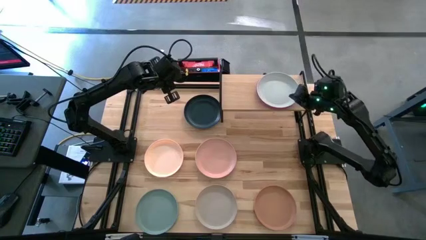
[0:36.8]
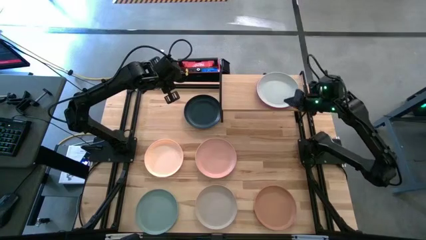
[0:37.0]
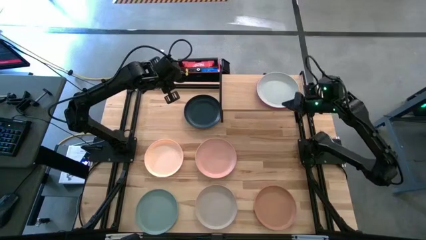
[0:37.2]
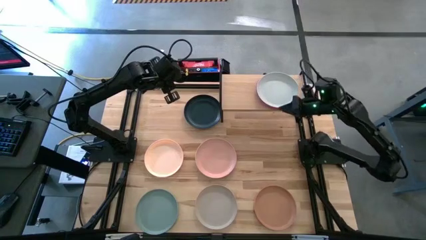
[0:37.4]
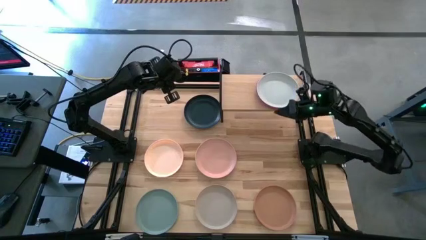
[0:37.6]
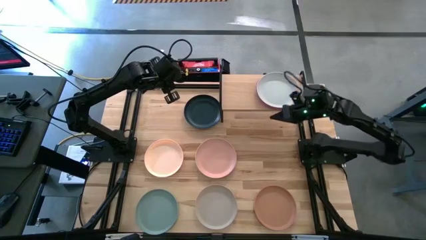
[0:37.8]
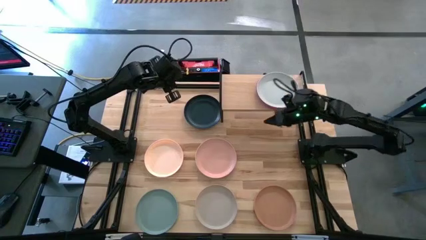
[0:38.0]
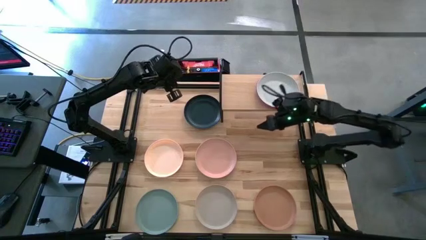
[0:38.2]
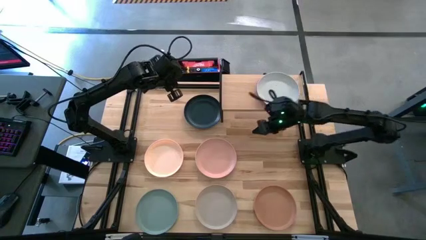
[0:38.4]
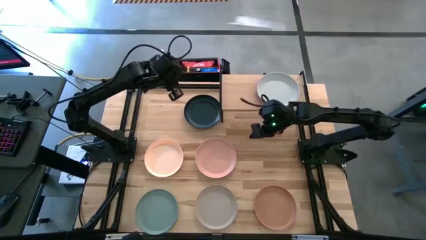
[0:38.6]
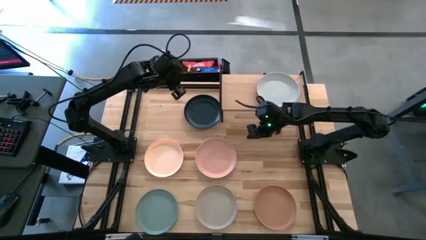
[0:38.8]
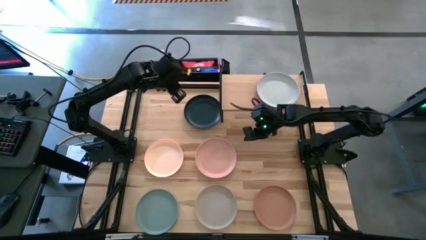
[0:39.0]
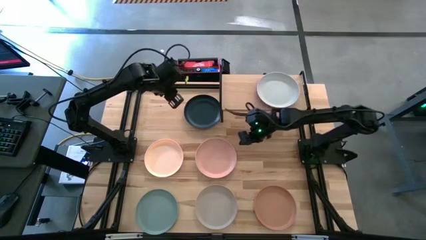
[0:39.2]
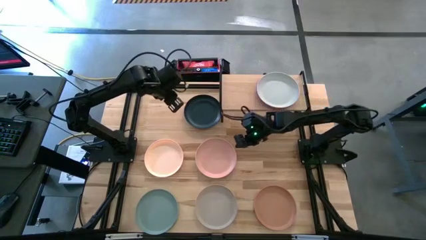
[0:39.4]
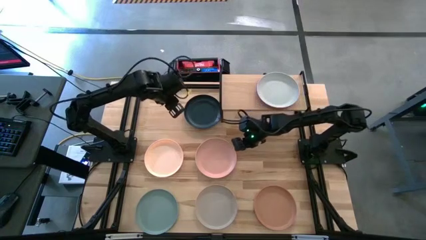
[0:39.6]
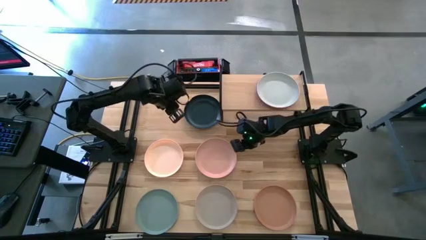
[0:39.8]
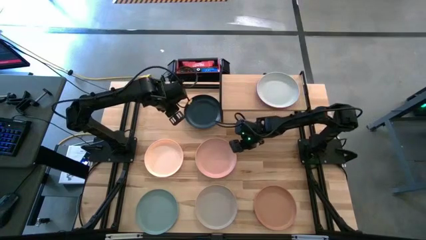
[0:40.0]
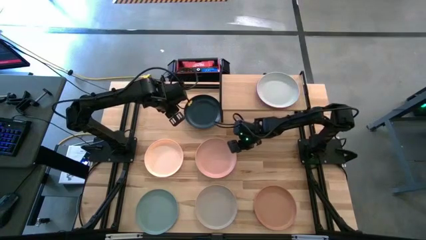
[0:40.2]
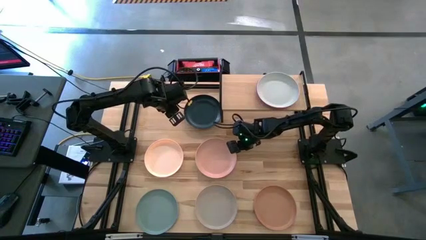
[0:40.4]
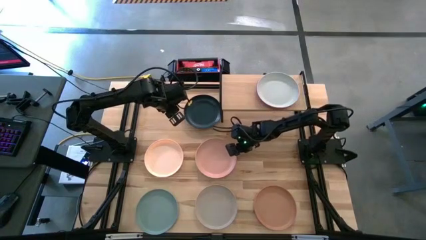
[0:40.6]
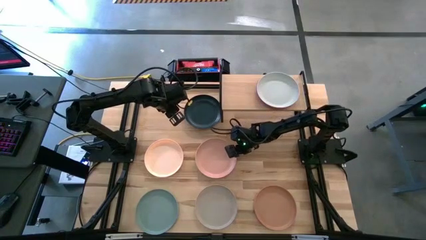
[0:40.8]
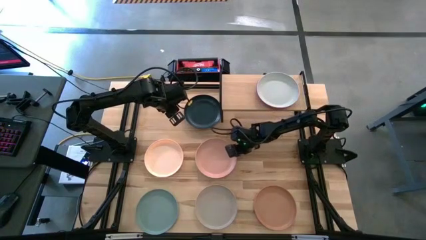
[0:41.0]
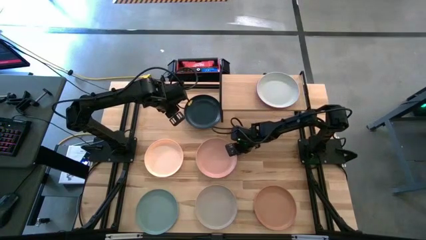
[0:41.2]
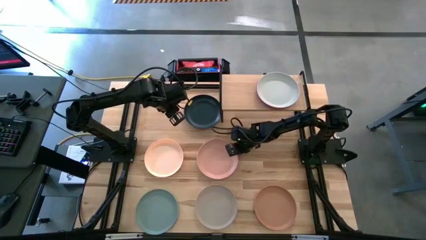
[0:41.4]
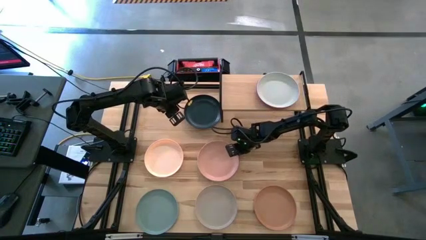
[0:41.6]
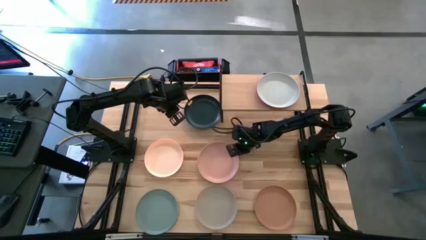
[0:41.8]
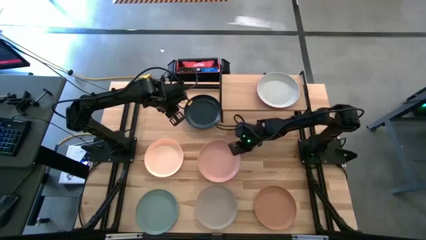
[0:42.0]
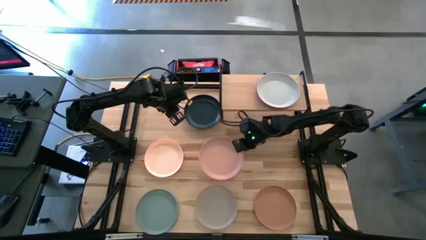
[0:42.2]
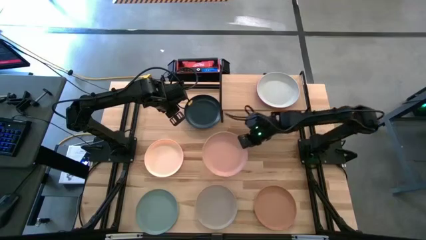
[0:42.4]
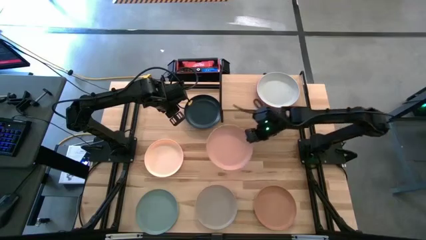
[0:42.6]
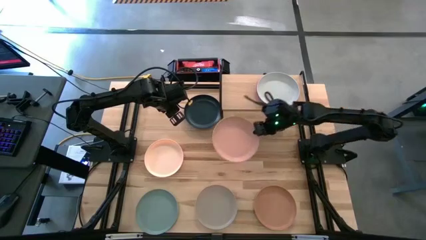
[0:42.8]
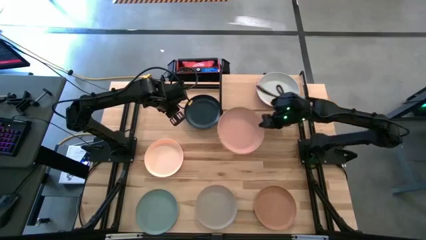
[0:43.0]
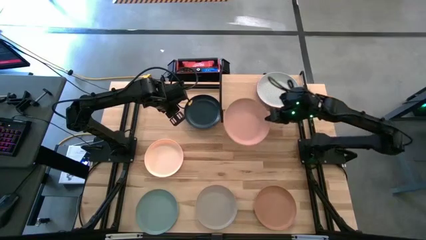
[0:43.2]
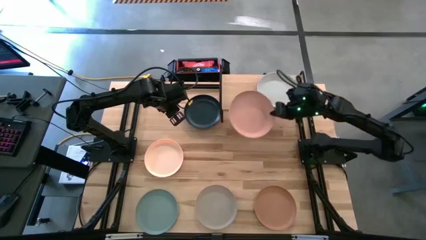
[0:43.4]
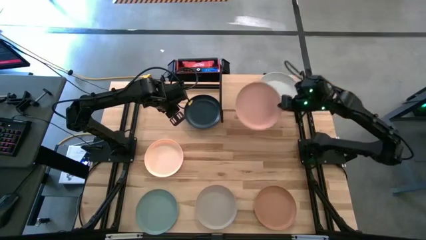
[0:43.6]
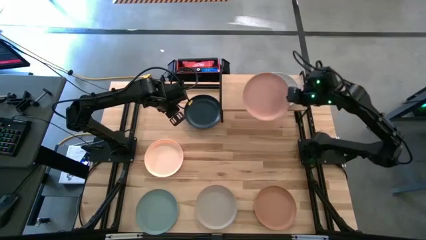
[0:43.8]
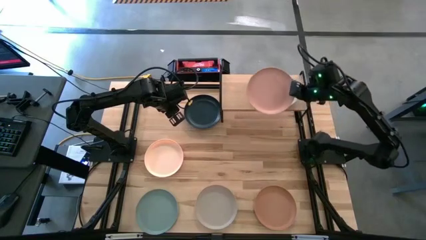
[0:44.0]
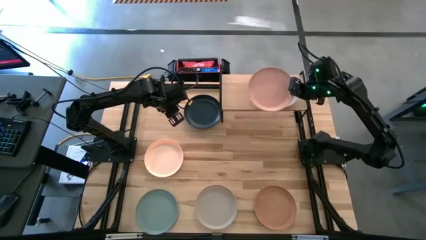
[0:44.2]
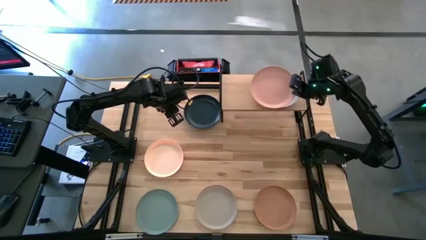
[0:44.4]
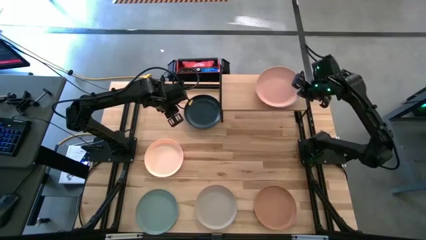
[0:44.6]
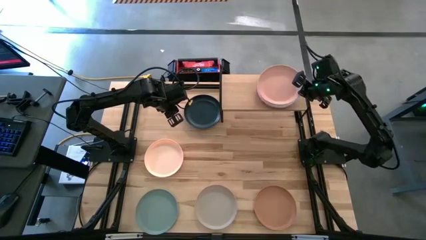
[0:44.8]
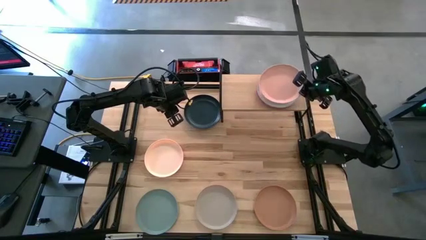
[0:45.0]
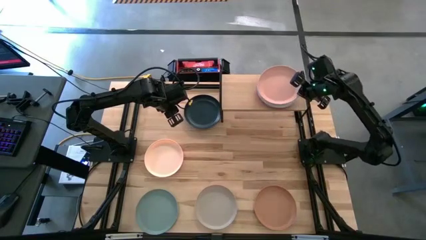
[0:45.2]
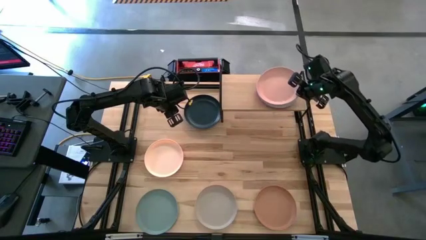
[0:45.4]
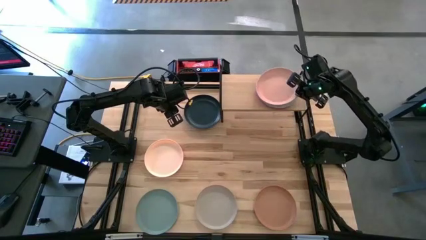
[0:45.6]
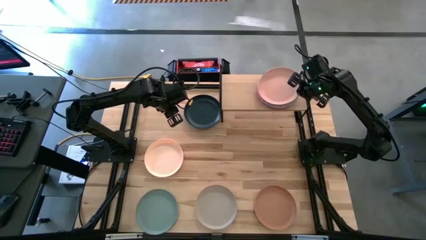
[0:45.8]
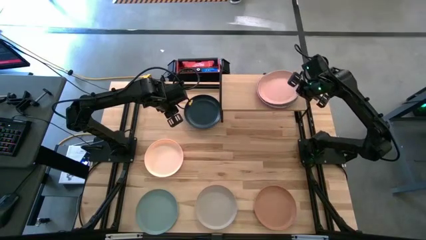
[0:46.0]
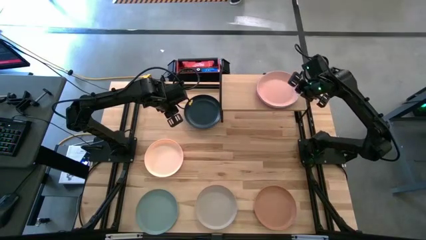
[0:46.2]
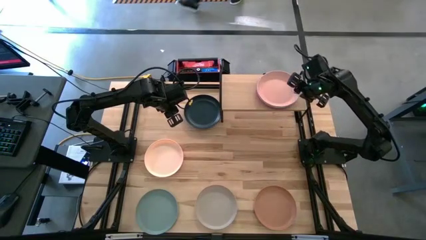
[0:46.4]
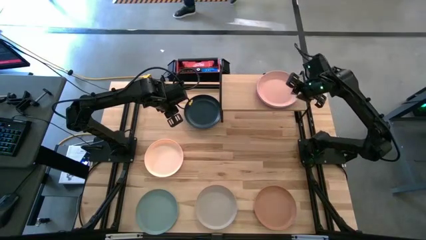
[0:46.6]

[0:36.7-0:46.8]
Task: Place and stack plates onto a shelf
Stack the light pink plate on top of the white plate on the shelf

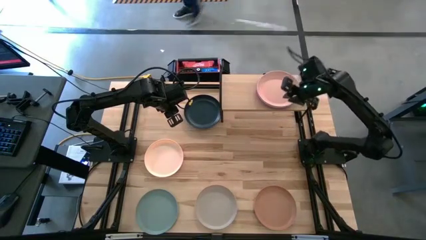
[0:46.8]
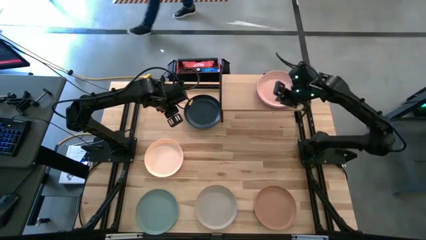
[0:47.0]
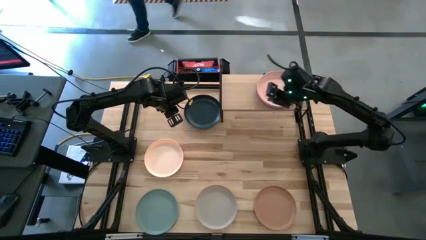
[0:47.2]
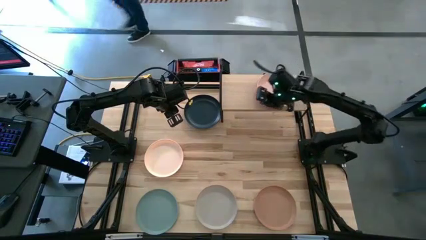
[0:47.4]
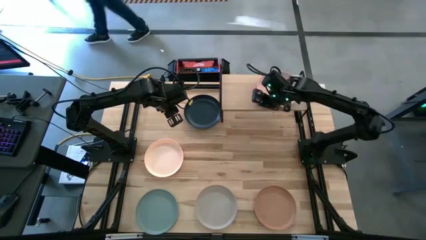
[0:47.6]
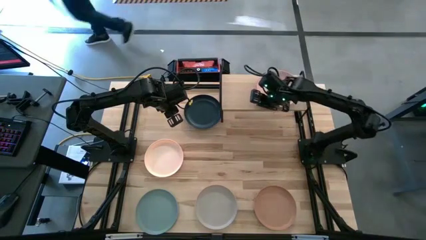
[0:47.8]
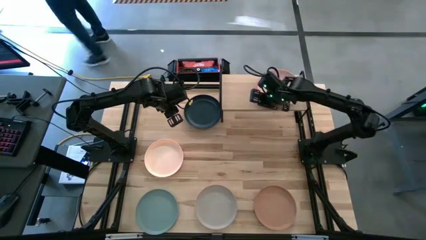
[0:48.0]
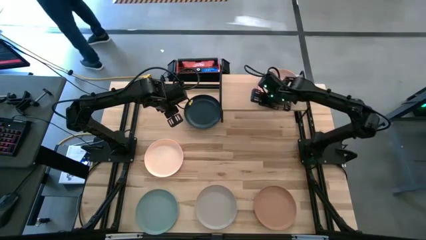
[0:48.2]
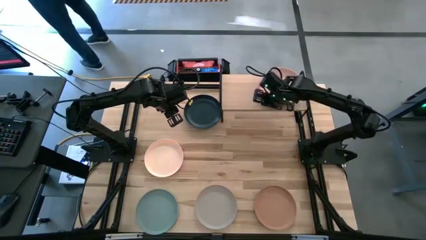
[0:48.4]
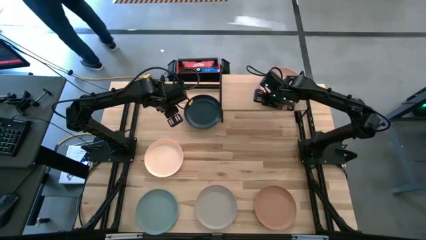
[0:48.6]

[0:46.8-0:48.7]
Adjust the stacked plates on the shelf
